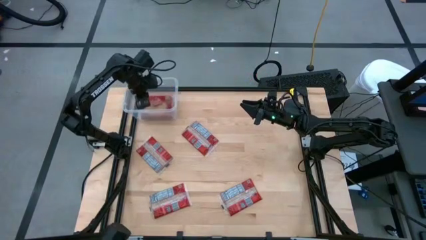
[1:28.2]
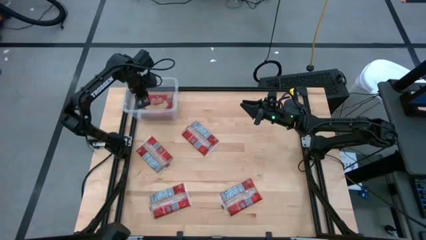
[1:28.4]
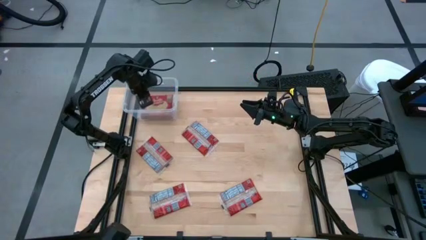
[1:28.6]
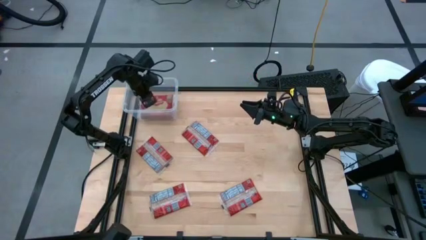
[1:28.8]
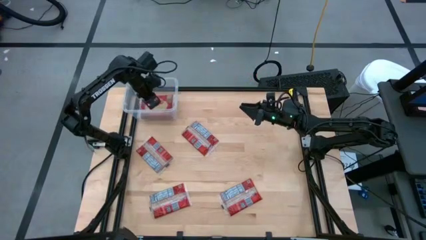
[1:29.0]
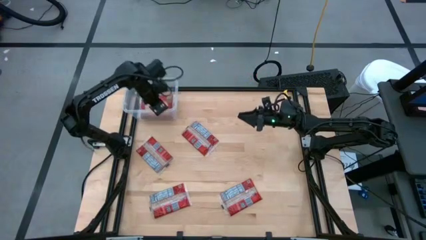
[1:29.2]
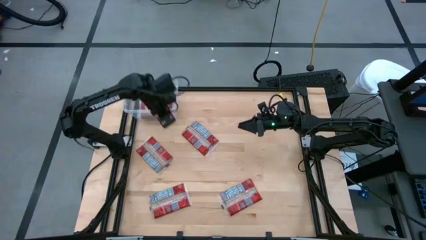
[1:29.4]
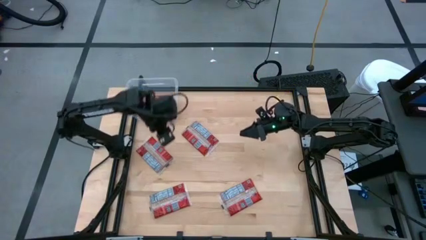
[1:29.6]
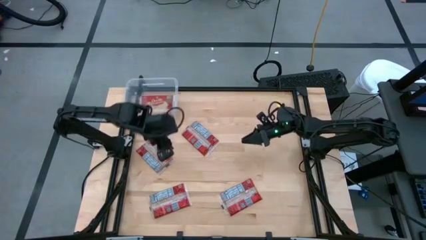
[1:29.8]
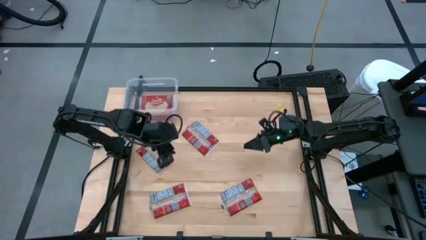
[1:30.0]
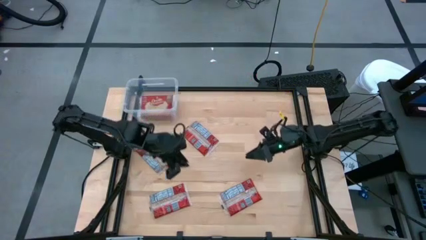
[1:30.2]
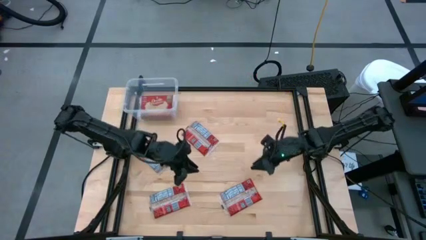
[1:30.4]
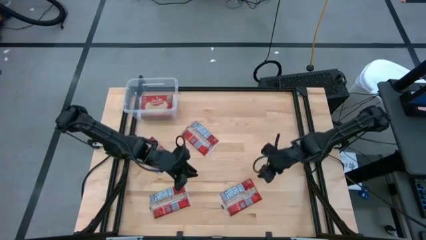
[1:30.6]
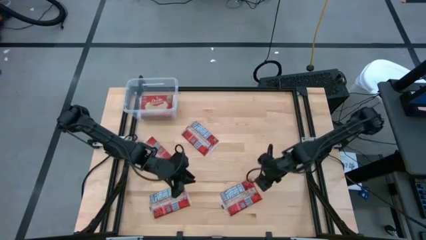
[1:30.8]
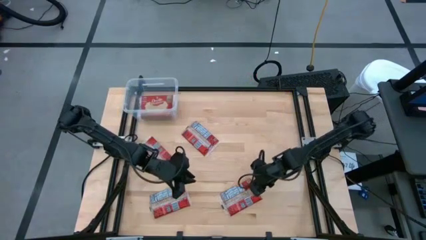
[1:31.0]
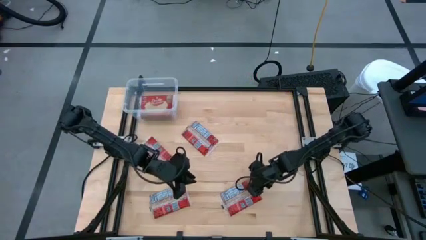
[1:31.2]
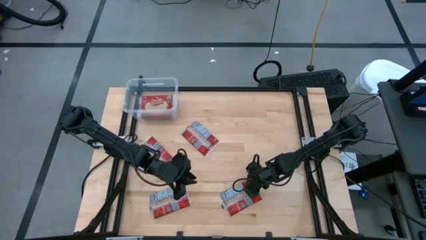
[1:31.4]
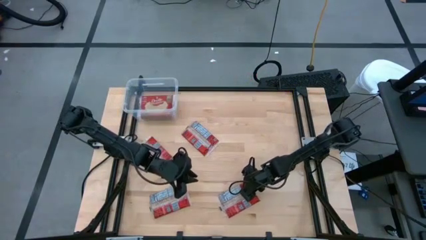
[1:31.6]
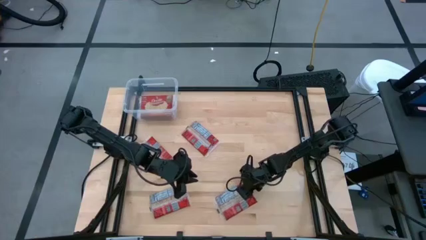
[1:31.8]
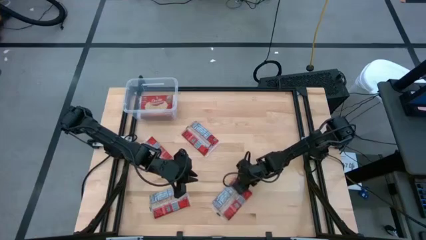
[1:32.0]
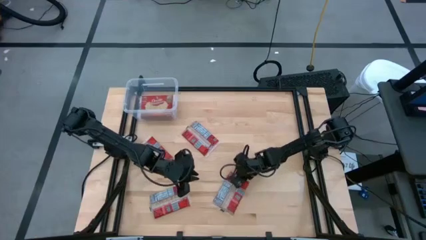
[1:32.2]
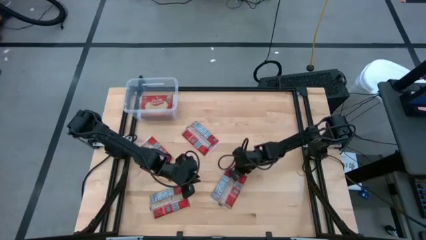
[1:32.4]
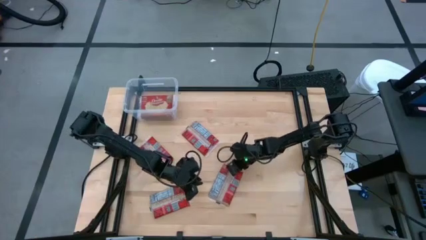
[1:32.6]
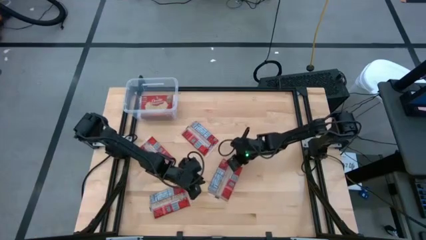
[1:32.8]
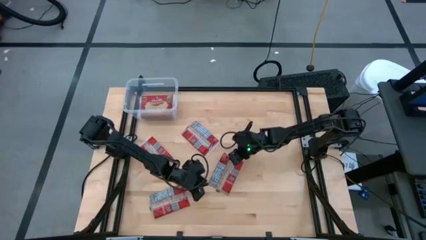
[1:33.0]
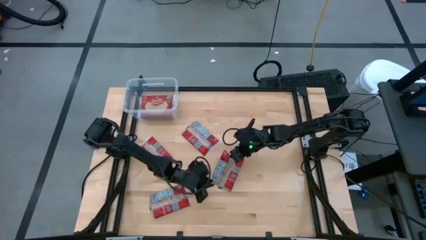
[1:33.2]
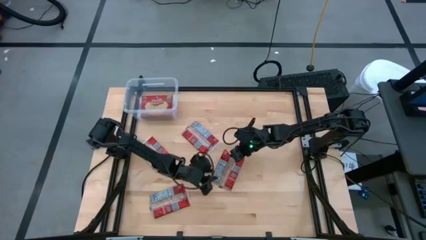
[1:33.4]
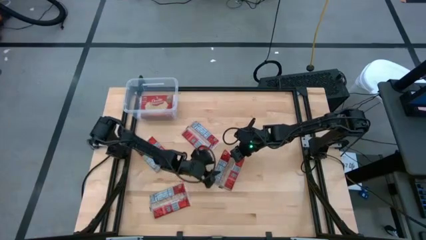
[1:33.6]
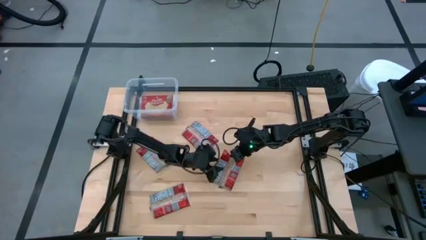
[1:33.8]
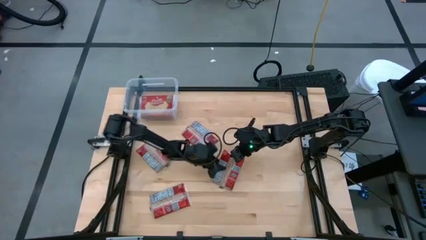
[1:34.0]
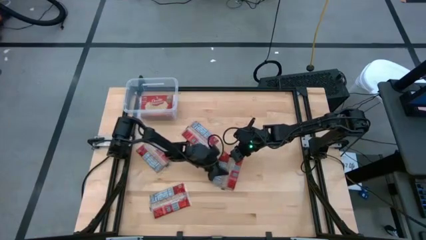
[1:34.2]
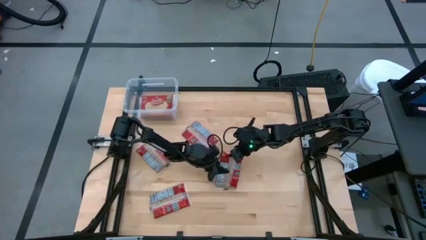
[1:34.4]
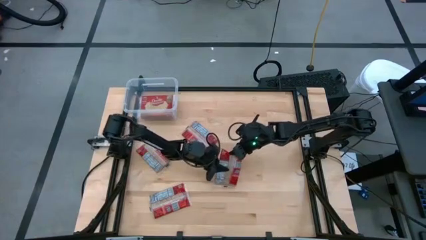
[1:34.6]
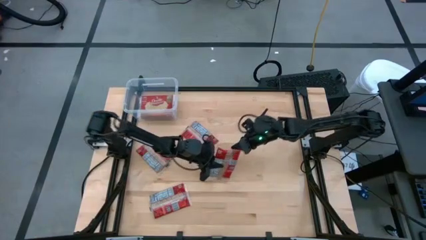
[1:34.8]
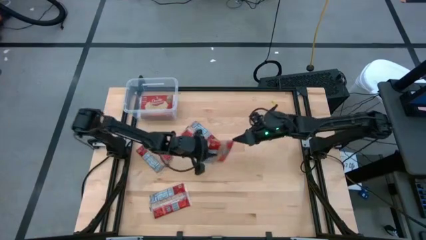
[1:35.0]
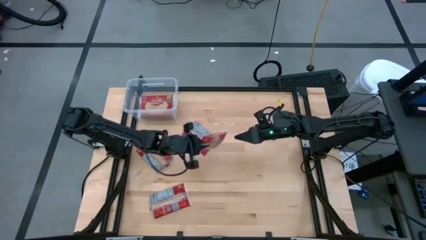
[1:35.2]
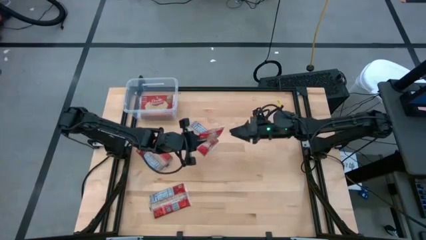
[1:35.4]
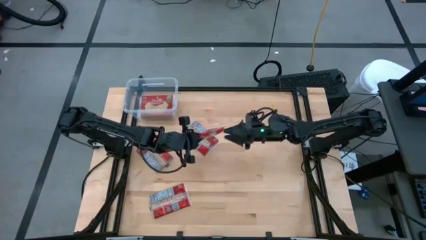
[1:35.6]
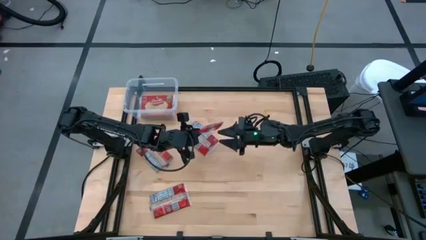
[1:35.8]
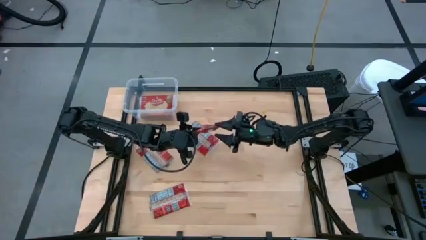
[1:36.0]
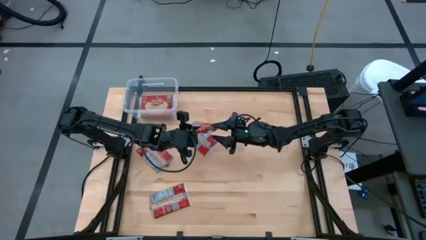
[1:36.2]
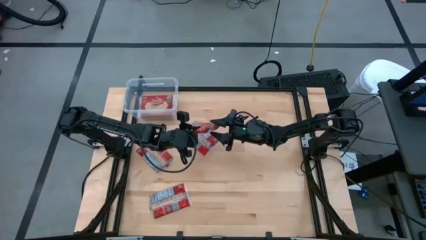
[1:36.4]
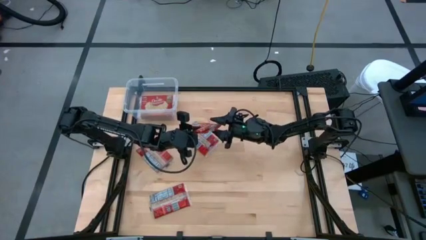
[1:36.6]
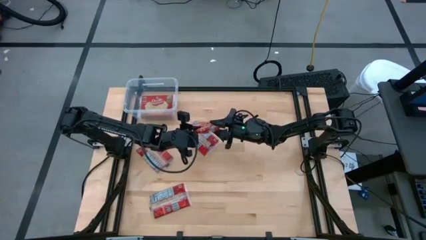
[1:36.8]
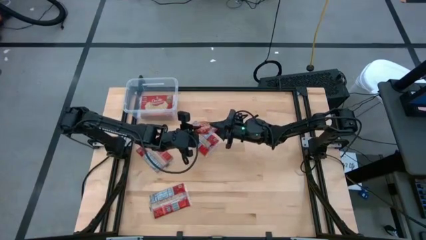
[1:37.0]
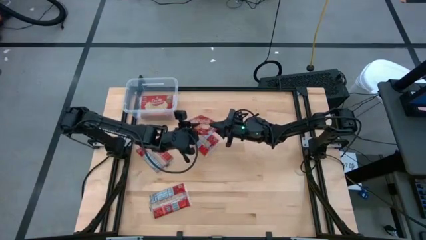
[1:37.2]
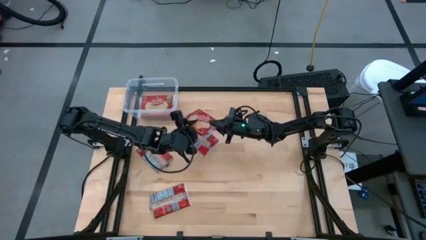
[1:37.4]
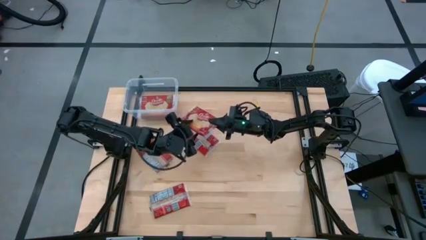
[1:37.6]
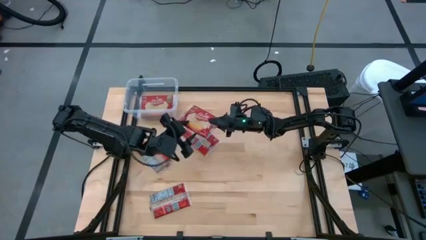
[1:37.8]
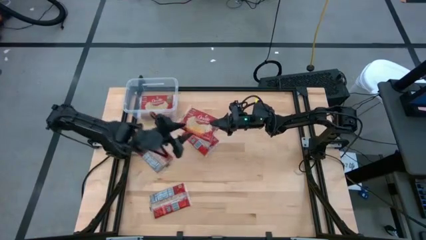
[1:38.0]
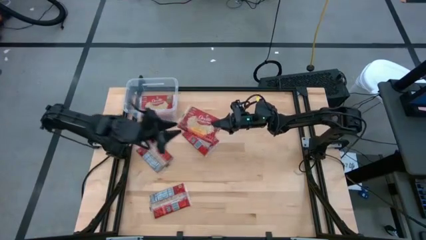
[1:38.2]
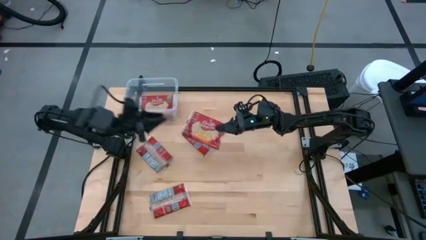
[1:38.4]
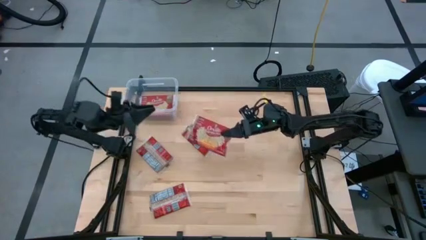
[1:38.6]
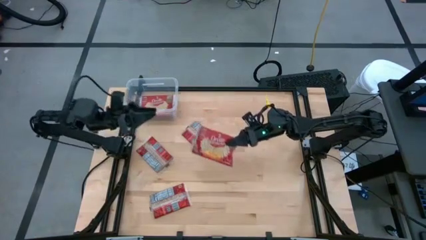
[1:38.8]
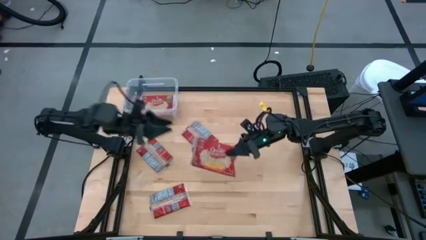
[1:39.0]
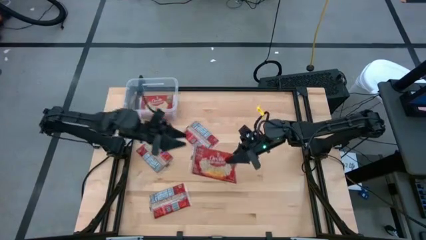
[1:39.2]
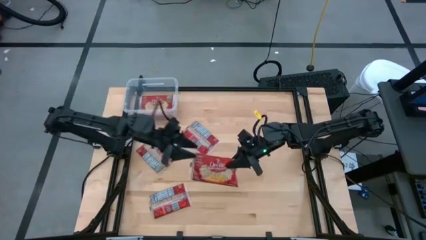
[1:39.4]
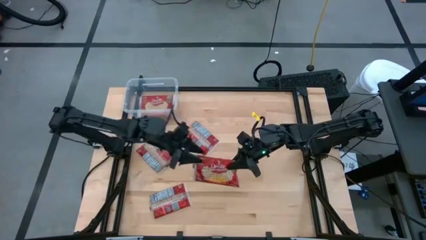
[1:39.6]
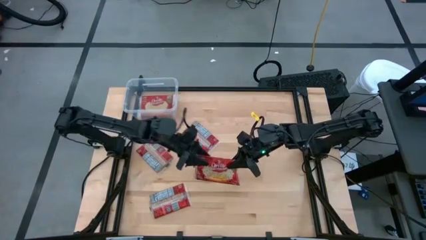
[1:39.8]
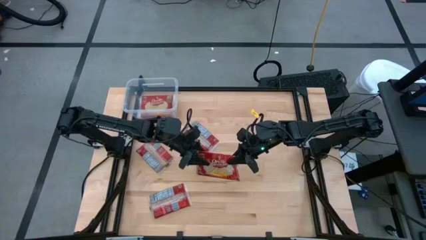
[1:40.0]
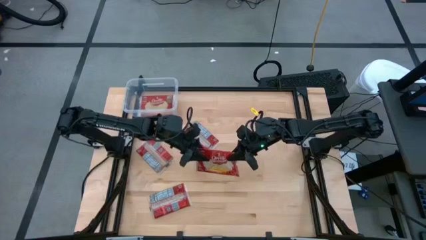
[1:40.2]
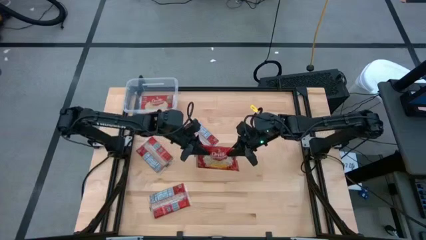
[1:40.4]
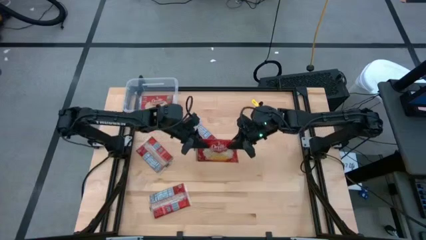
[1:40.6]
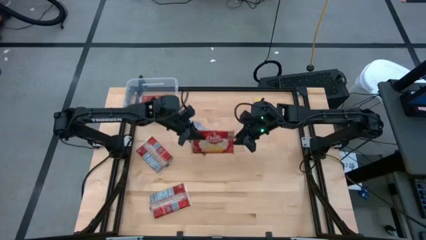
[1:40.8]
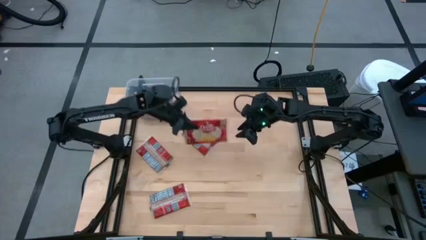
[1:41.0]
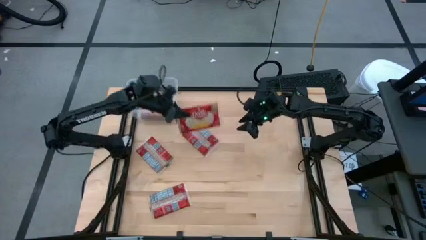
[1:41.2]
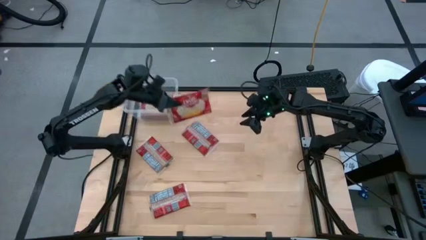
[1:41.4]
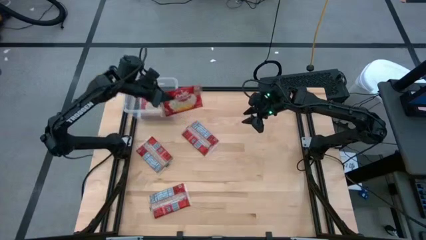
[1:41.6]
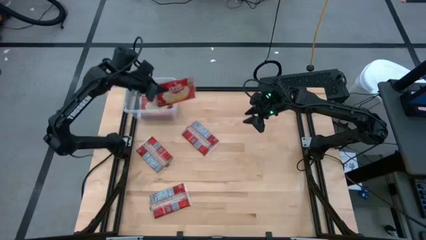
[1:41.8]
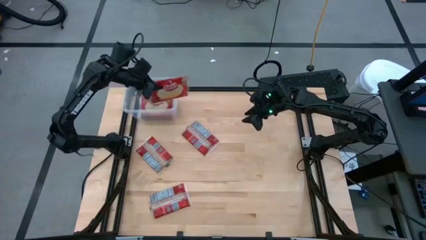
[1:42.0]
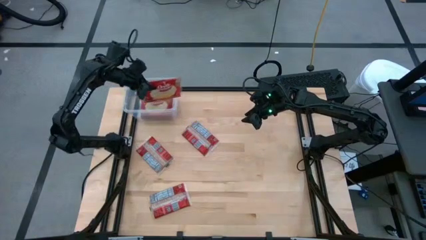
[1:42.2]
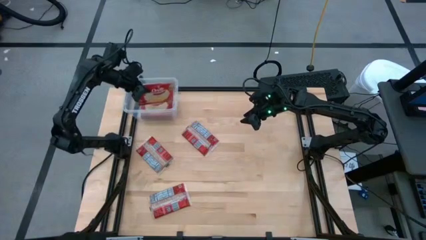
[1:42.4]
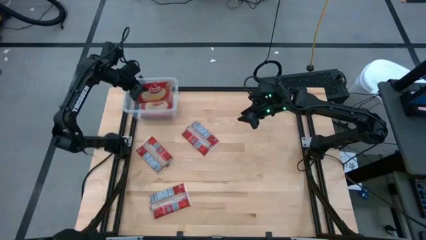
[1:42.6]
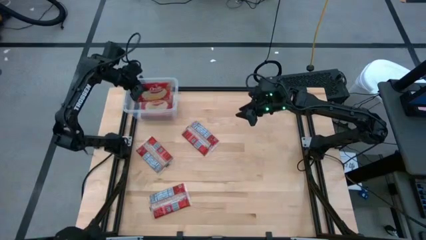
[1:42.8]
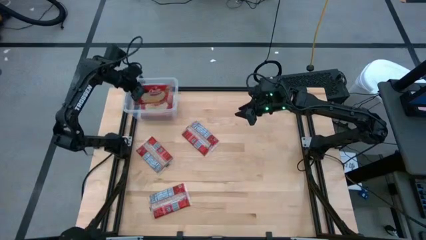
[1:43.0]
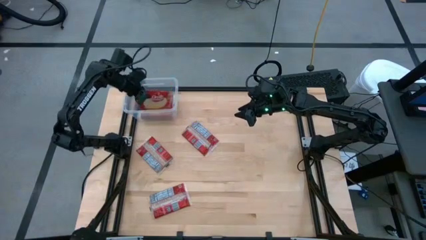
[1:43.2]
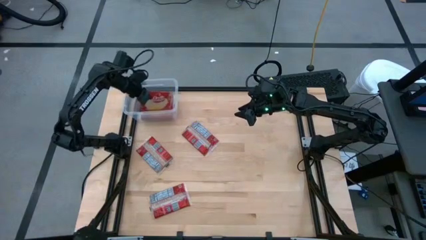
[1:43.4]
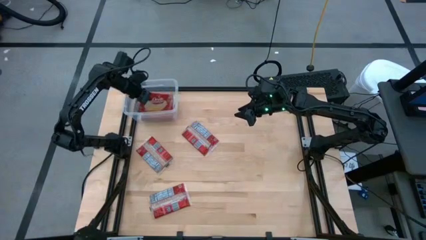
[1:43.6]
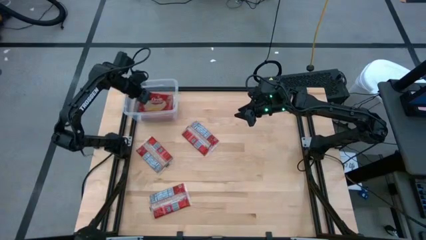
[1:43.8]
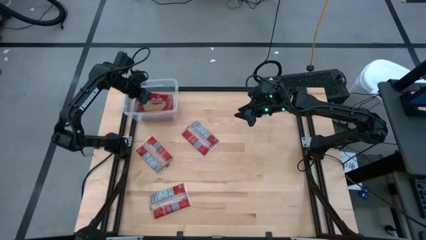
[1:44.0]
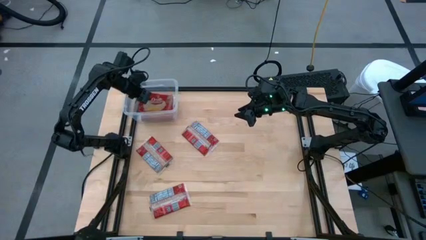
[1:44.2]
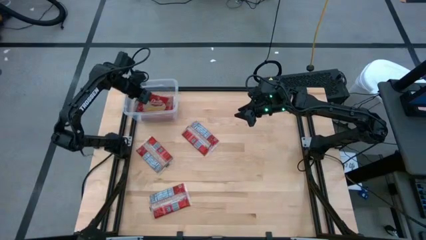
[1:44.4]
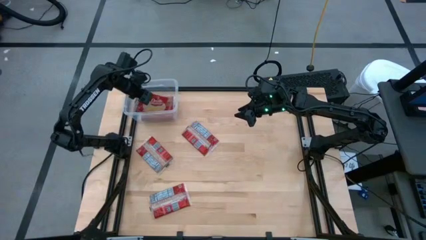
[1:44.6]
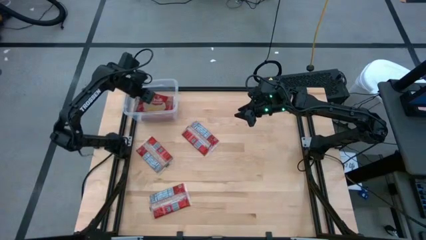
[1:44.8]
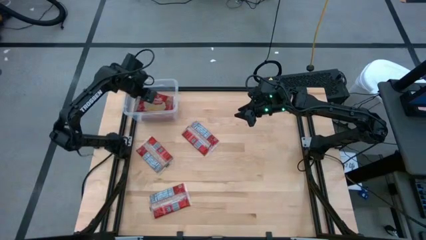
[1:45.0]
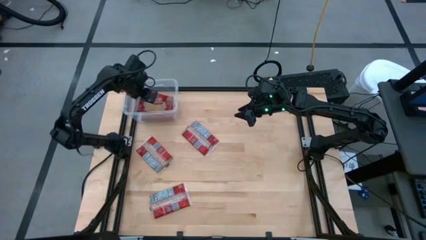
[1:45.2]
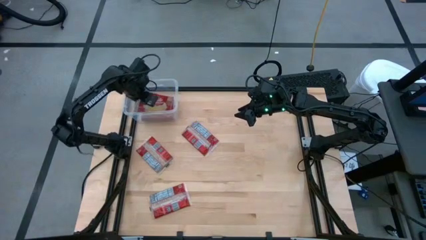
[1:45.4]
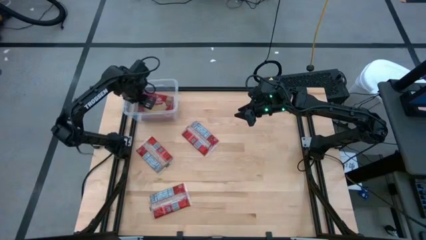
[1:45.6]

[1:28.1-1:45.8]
Task: Sort popcorn bags into baskets
Put the popcorn pack into the transparent bin
